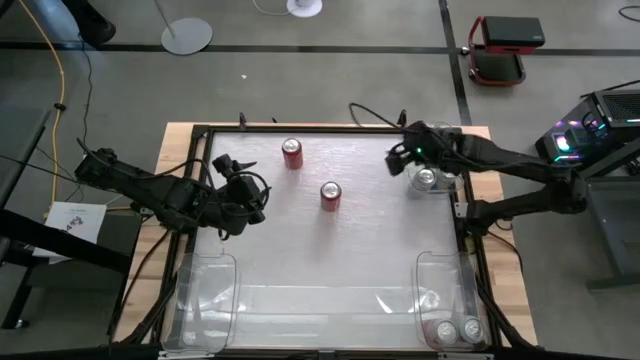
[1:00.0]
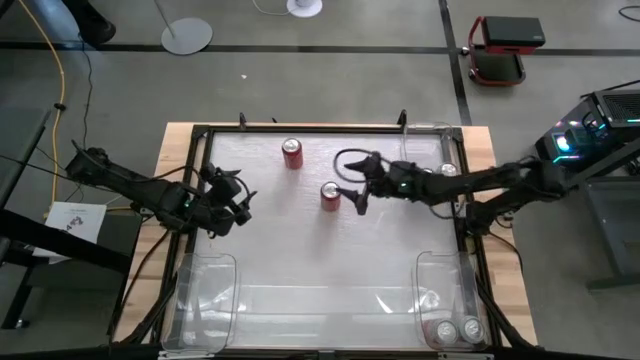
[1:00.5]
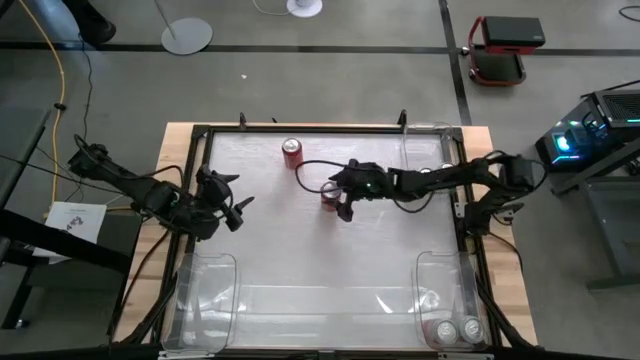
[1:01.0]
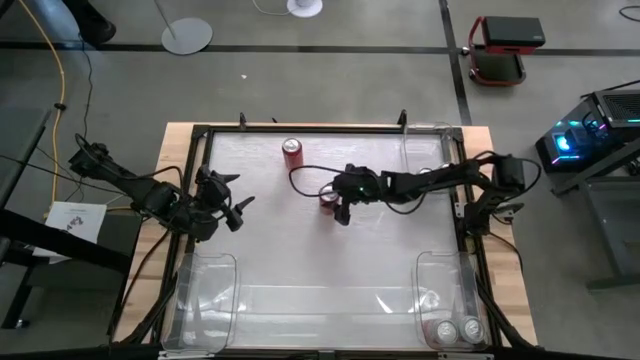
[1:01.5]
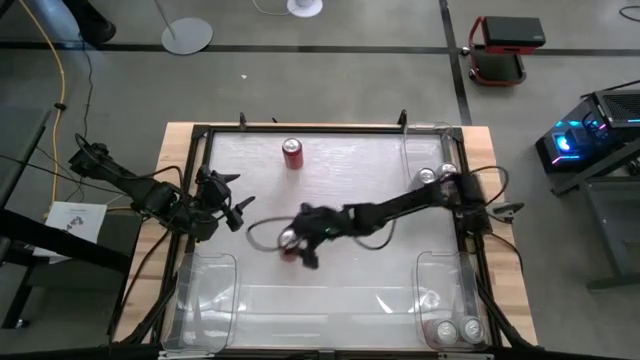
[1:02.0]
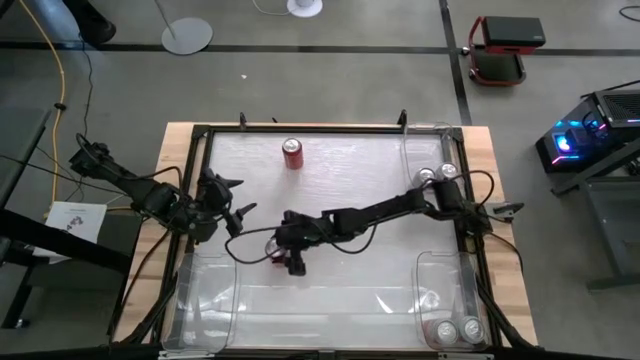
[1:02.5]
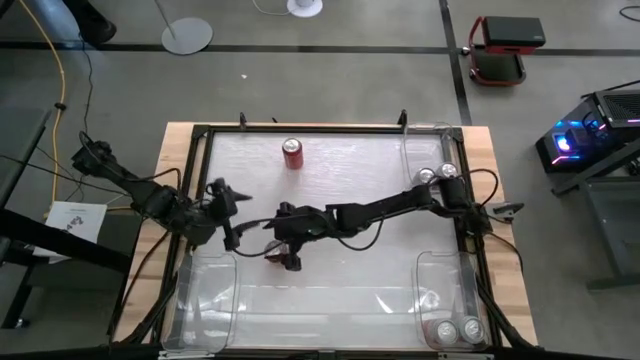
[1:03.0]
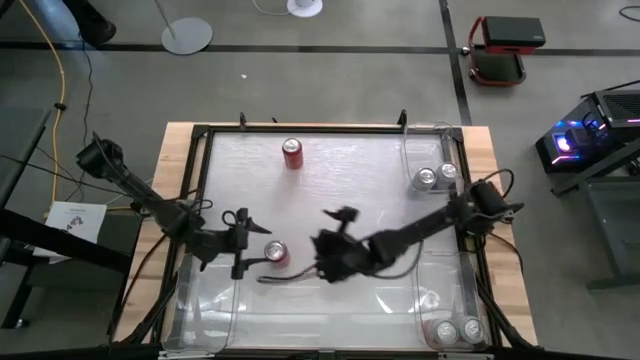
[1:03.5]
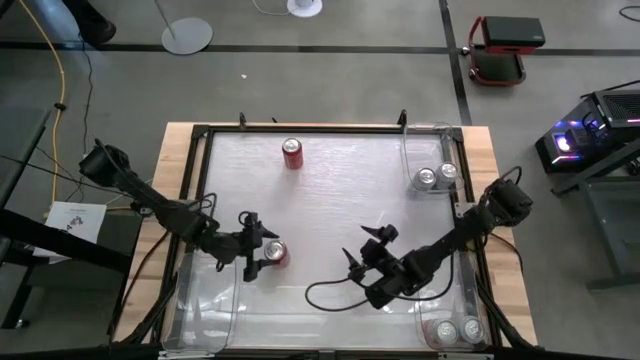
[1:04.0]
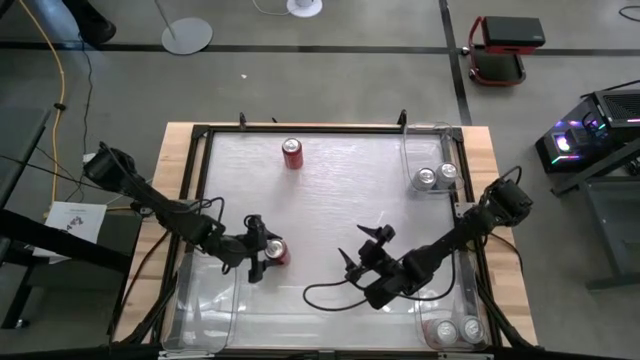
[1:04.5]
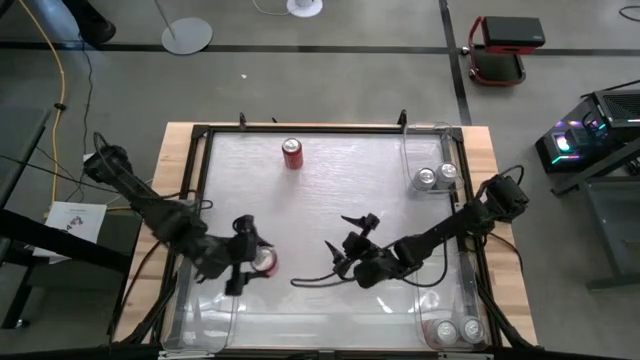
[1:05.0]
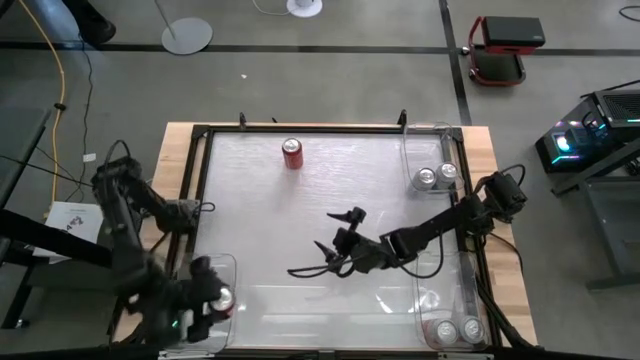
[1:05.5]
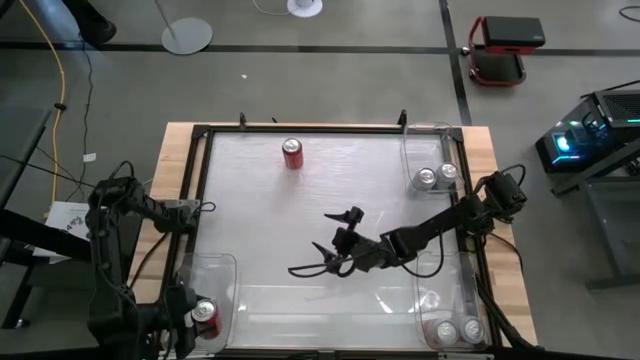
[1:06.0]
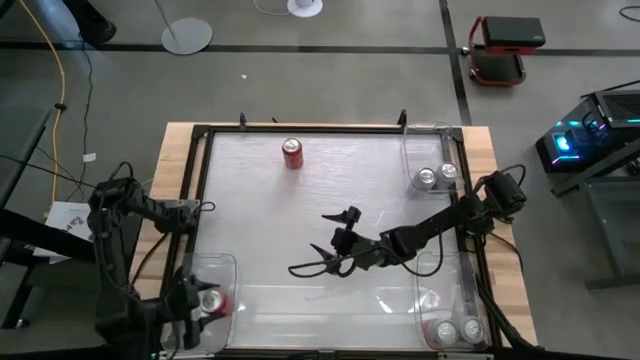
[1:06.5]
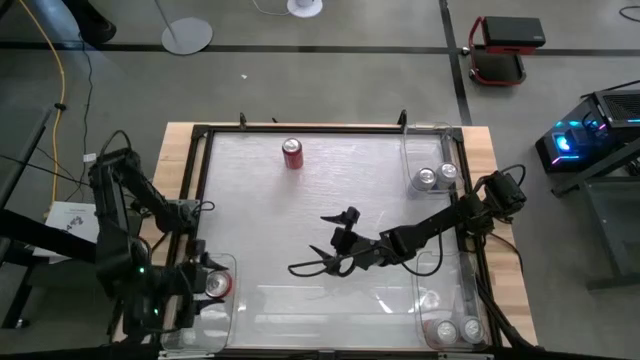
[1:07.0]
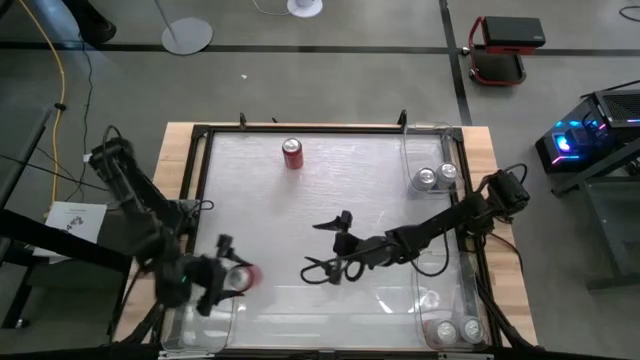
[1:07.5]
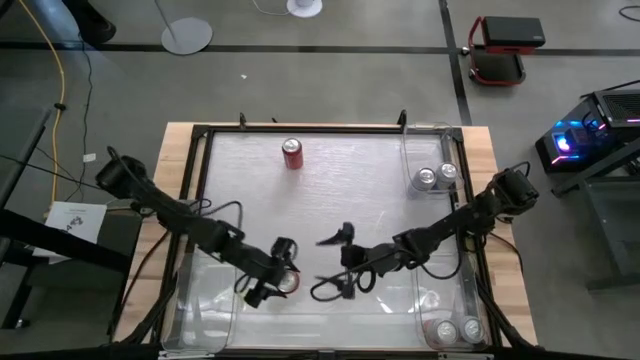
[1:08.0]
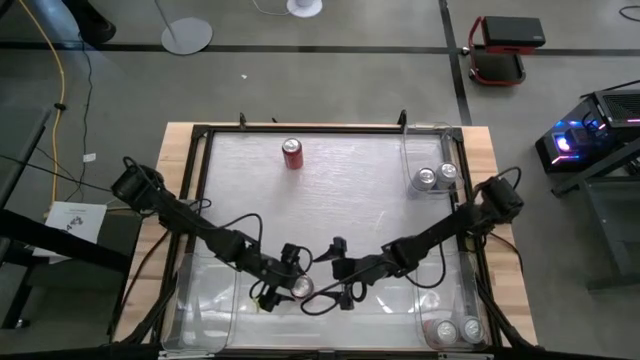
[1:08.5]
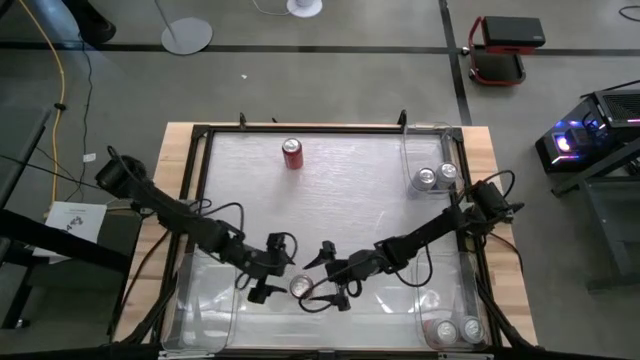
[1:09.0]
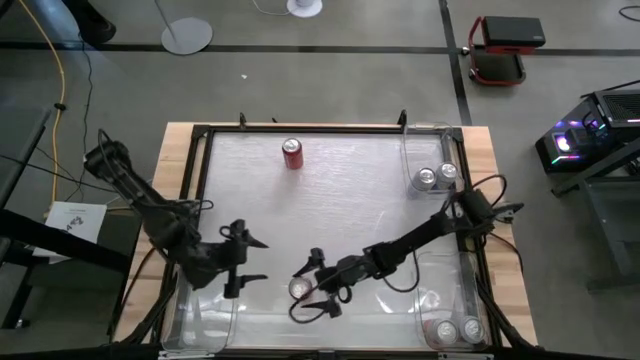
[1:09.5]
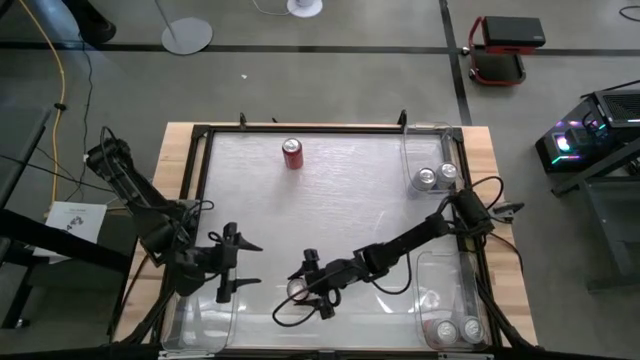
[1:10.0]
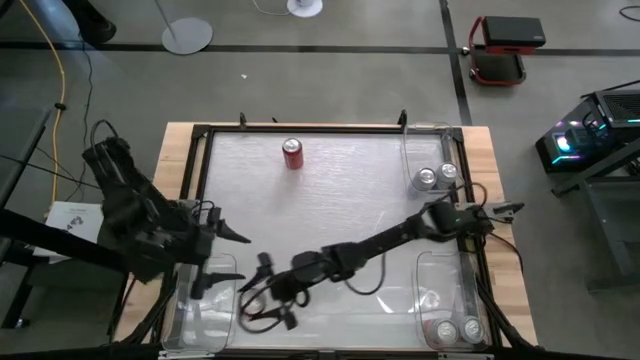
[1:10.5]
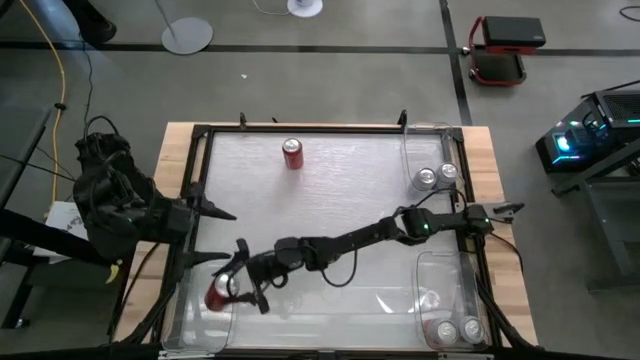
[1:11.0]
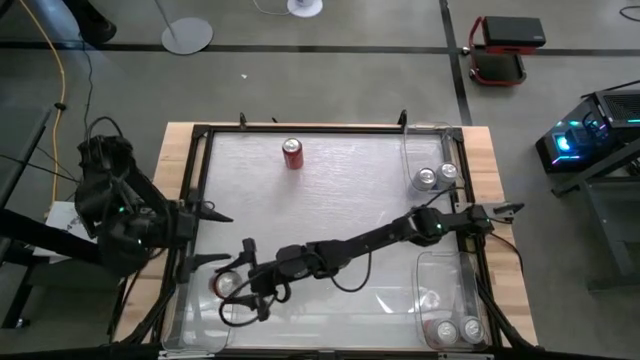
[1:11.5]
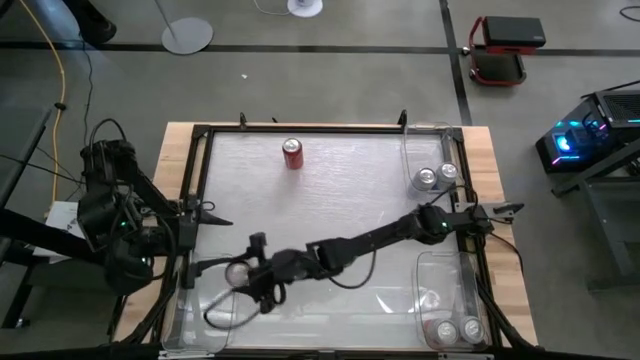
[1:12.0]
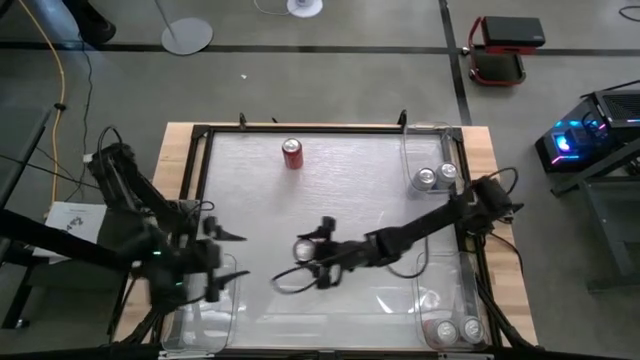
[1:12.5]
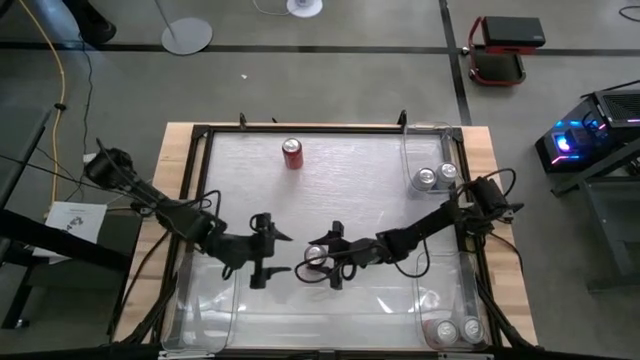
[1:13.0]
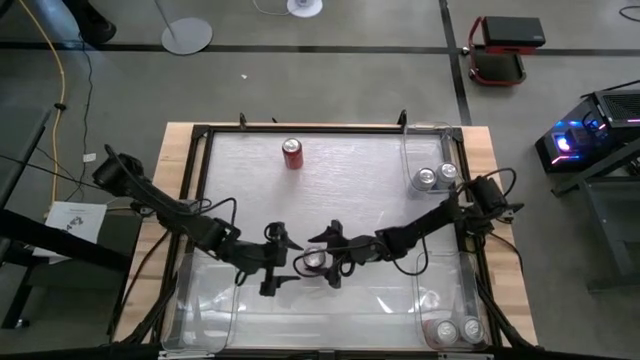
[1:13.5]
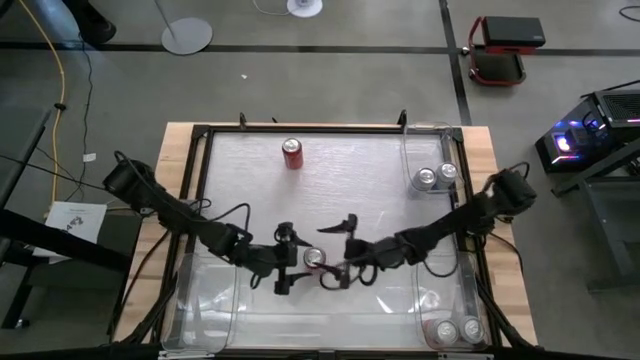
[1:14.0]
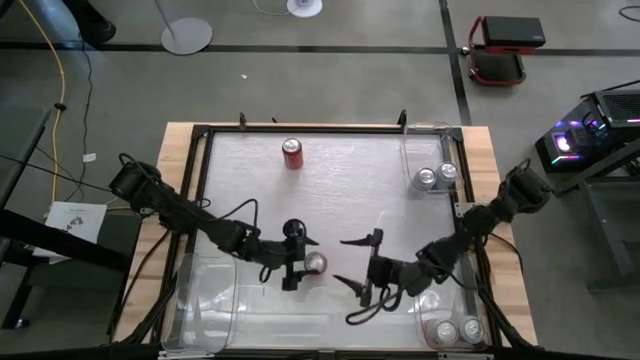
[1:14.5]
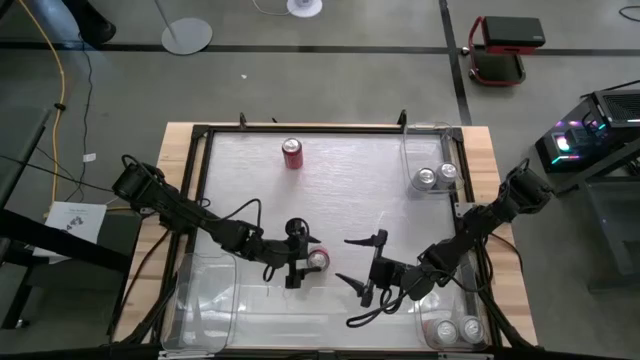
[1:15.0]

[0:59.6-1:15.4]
Task: Sort soda cans
Put the bottom red-black soda can into the bottom left transparent bin

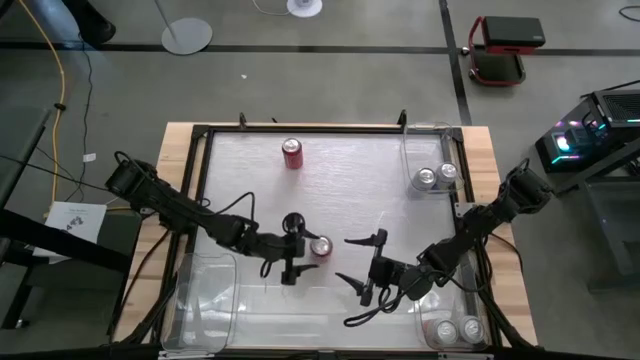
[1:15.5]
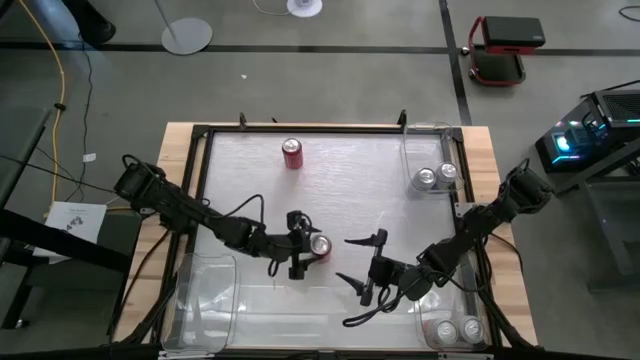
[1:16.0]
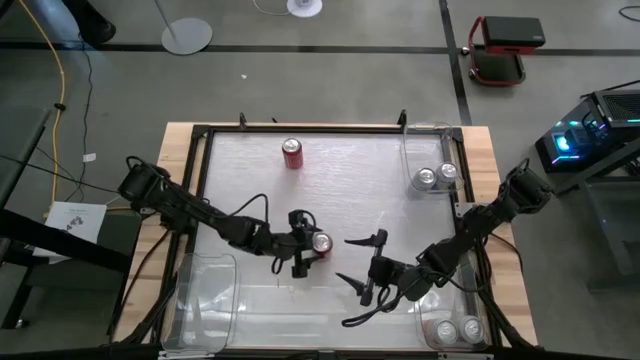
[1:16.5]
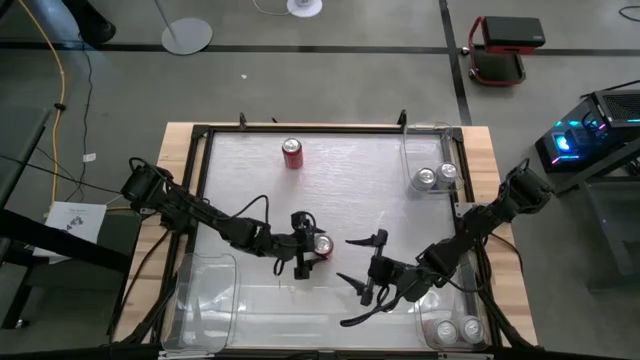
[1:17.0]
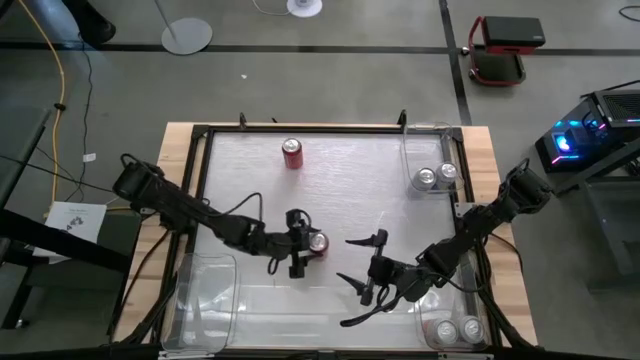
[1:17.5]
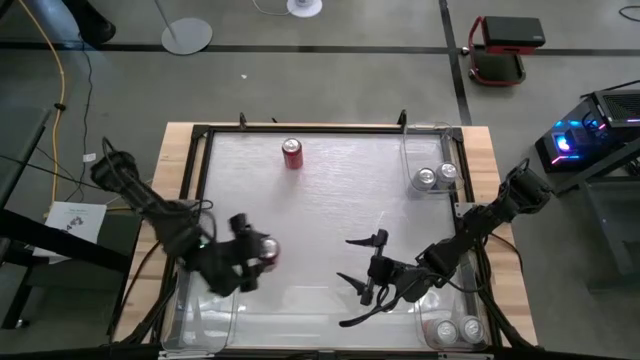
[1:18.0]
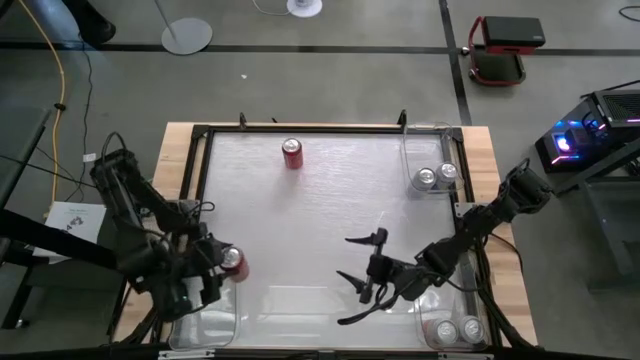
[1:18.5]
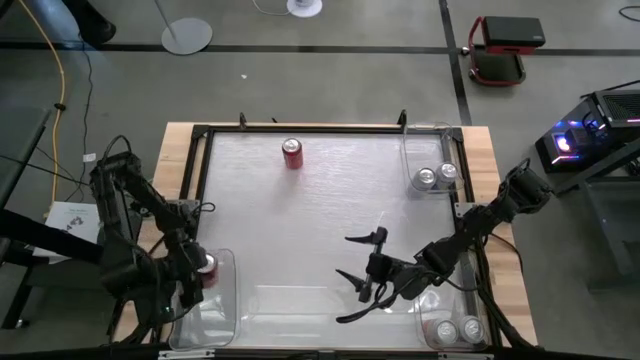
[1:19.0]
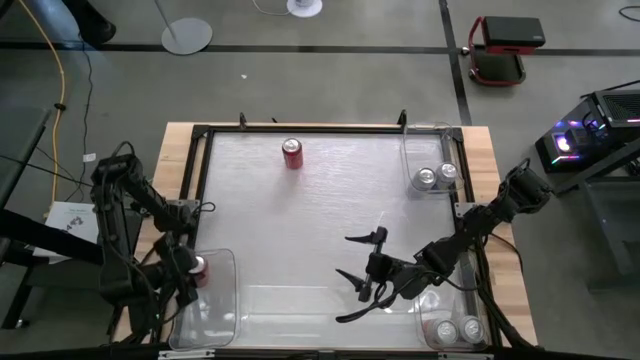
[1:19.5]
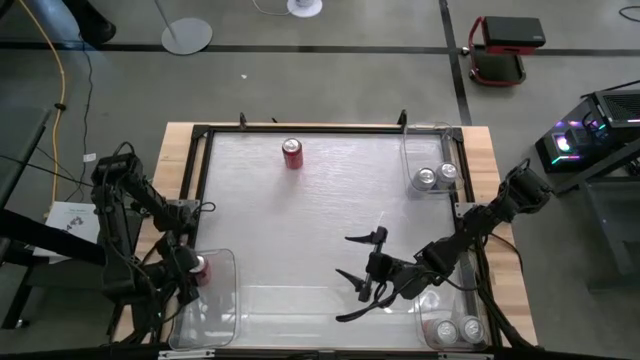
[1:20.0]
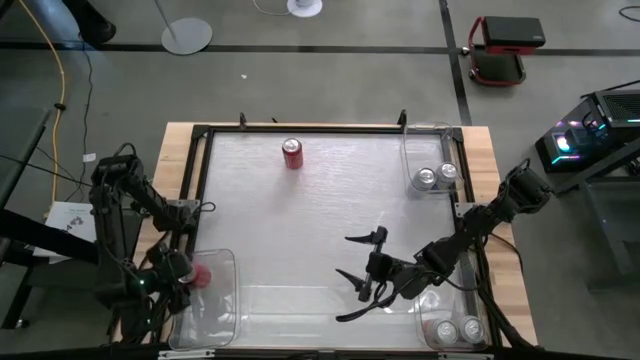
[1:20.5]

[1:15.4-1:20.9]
Put the bottom red-black soda can into the bottom left transparent bin
